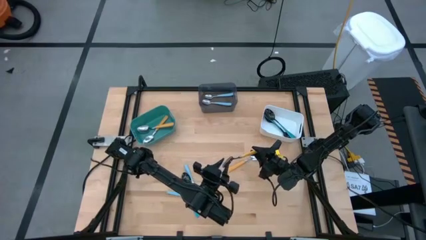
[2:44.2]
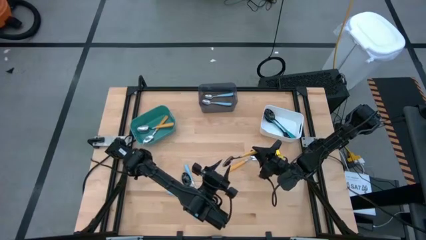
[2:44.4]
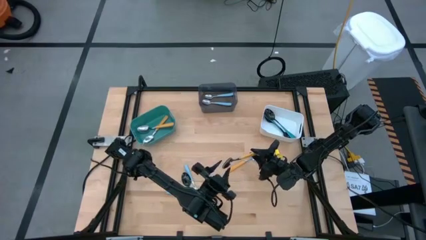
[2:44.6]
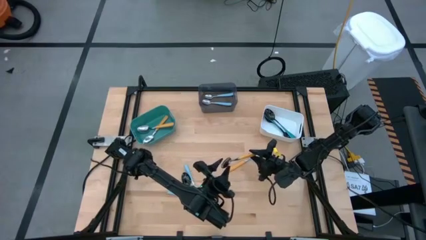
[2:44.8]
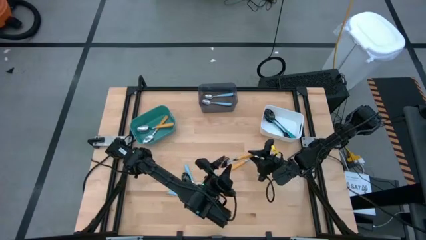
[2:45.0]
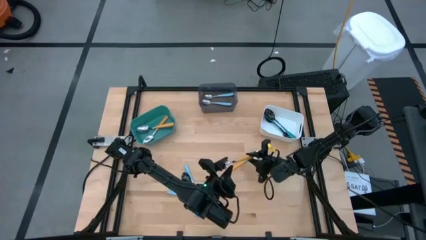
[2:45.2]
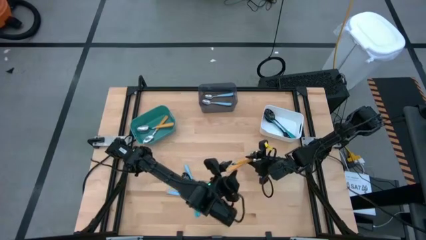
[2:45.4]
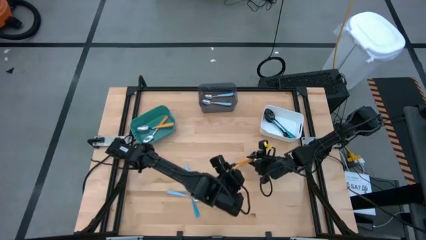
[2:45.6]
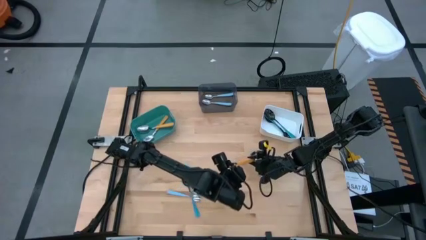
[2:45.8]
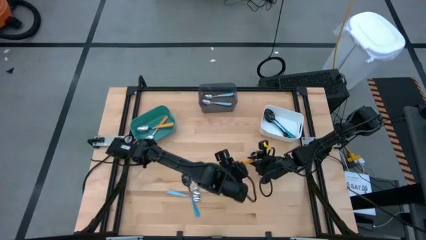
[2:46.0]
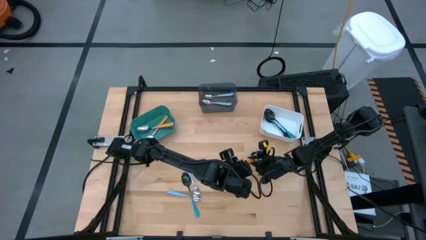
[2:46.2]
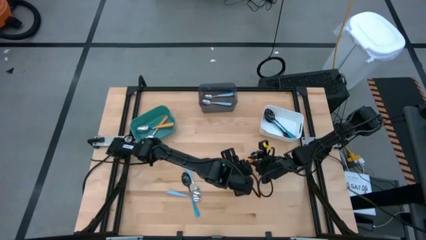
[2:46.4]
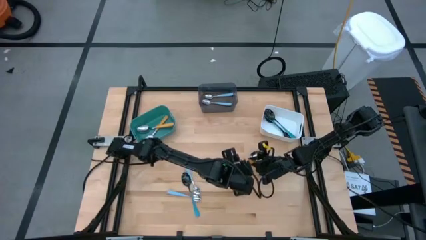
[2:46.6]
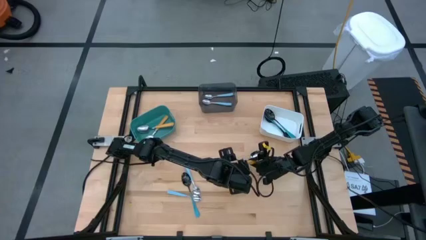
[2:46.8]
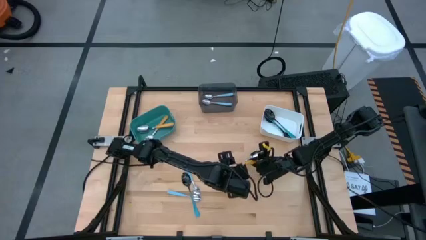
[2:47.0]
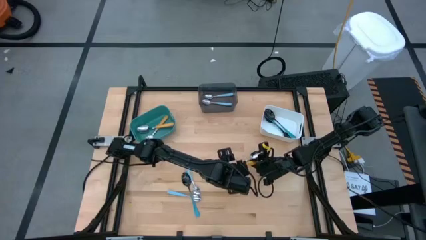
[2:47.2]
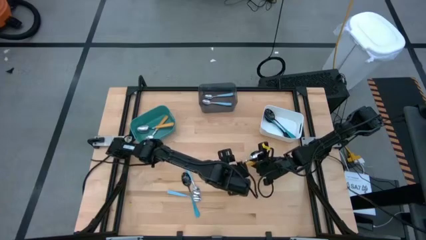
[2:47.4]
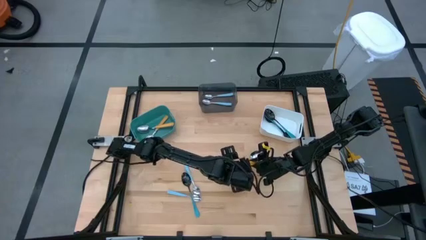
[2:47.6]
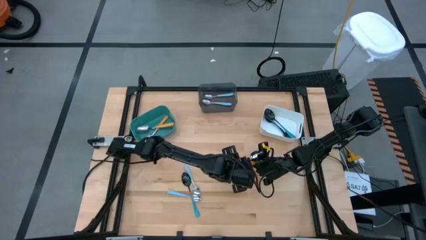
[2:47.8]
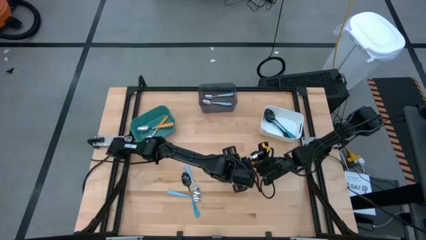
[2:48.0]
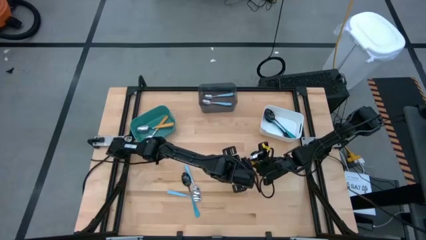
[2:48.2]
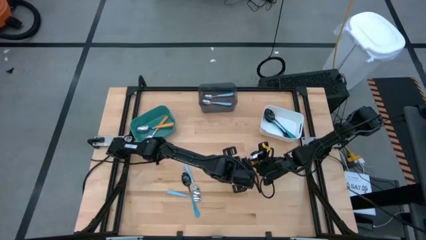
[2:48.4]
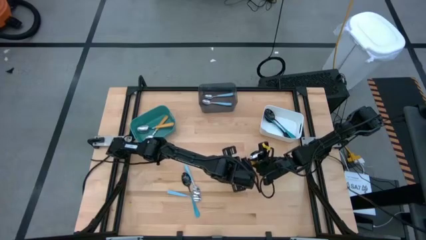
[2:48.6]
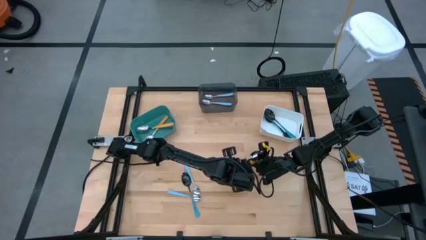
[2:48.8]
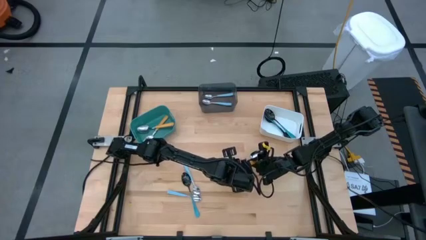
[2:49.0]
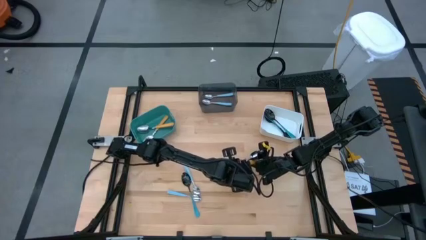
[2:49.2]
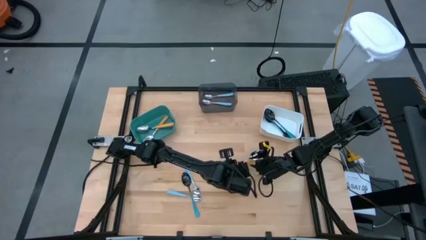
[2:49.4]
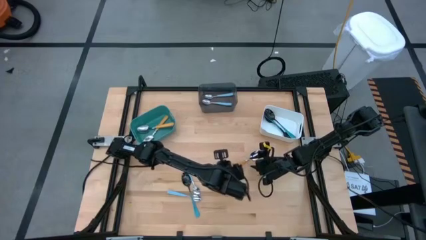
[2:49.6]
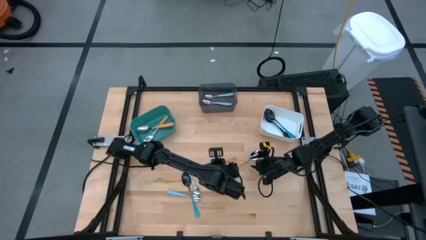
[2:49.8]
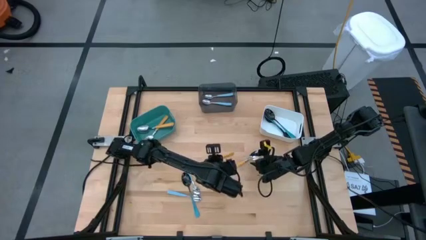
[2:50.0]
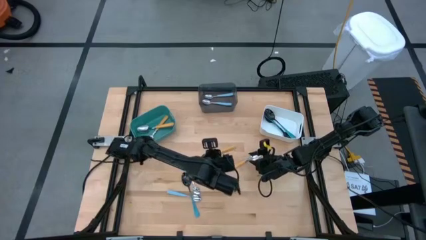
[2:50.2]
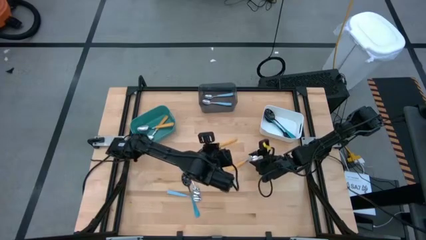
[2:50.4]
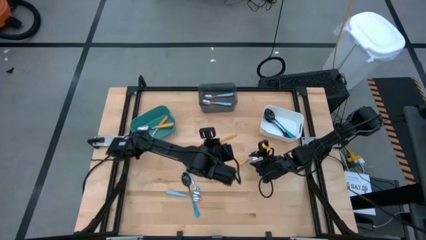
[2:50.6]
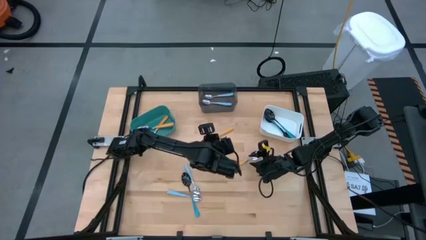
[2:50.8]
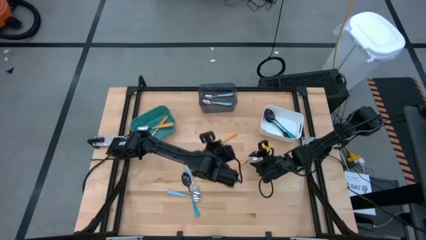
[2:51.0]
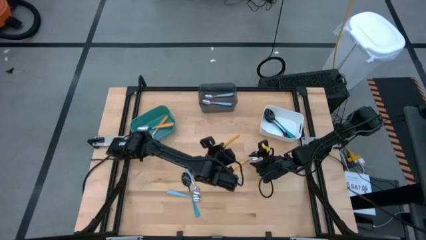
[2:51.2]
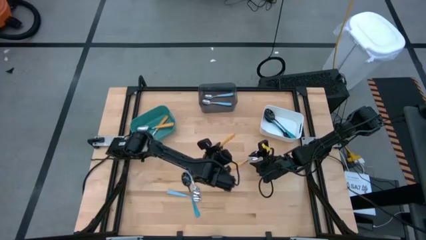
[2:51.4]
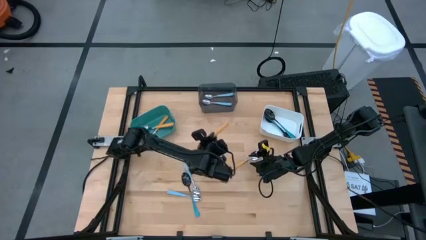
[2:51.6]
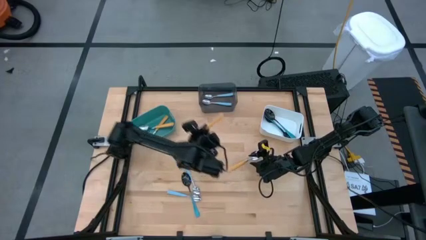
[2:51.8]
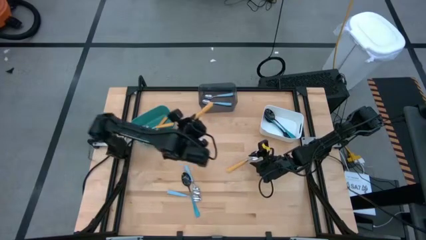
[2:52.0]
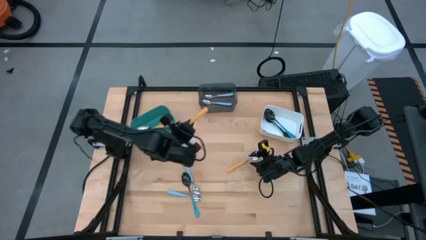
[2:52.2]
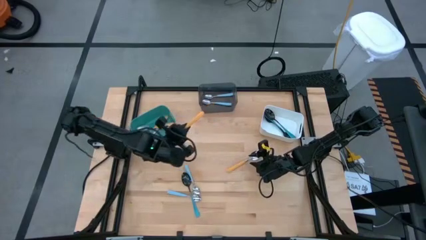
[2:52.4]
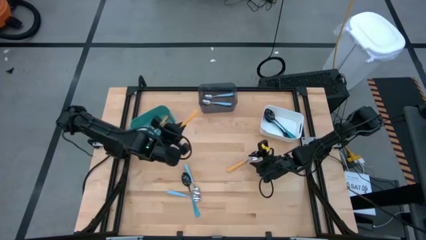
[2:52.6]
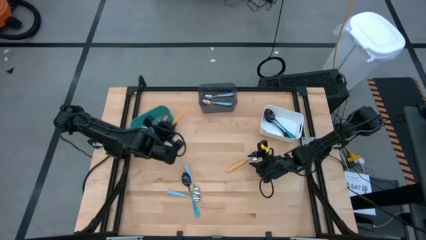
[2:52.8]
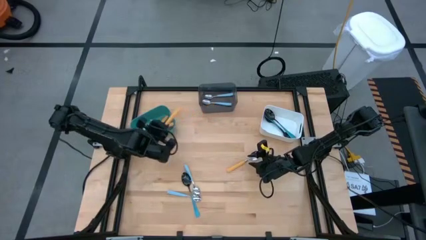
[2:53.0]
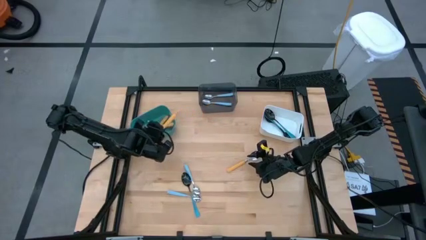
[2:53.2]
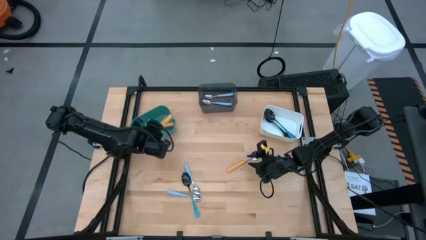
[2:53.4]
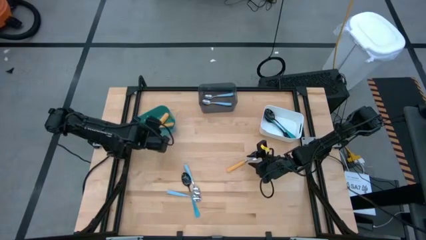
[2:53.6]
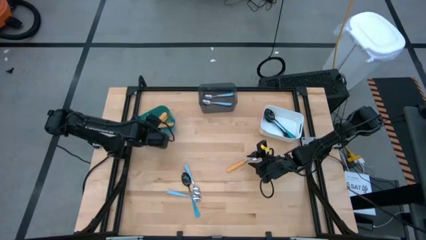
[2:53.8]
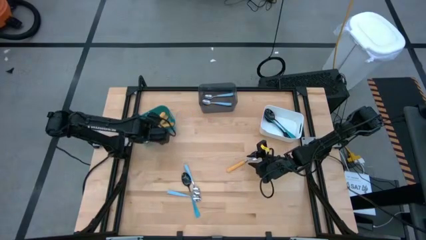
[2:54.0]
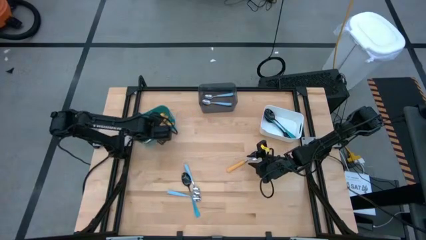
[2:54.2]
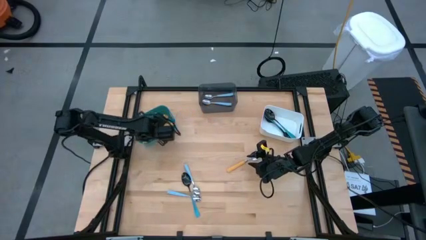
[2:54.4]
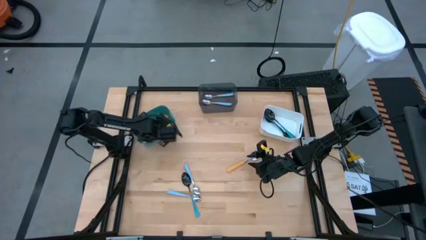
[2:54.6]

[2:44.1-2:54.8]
Task: Sort silverware by color (type)
Put the yellow spoon into the green bin
